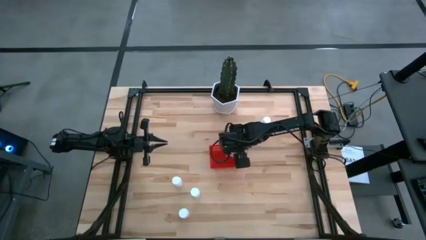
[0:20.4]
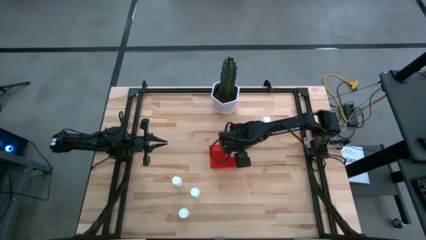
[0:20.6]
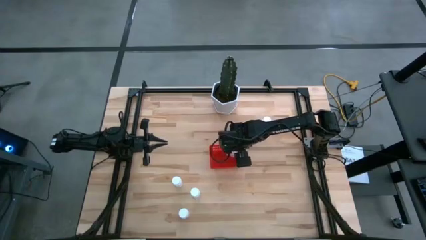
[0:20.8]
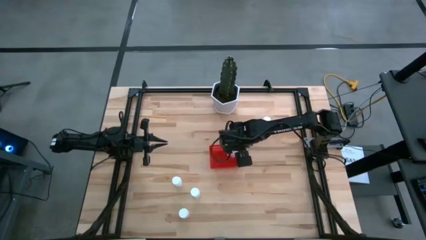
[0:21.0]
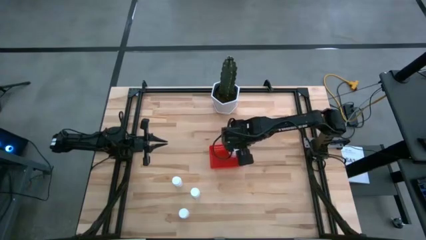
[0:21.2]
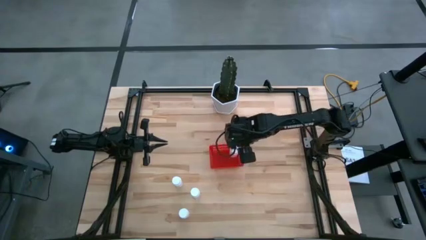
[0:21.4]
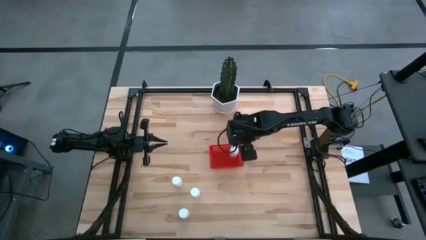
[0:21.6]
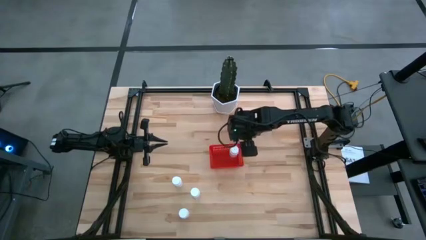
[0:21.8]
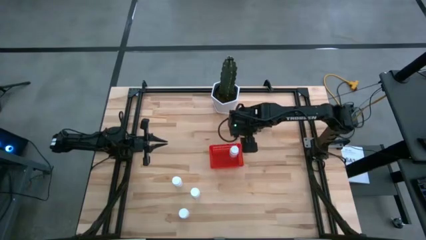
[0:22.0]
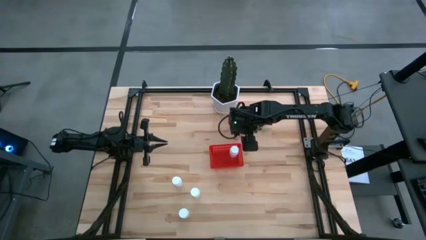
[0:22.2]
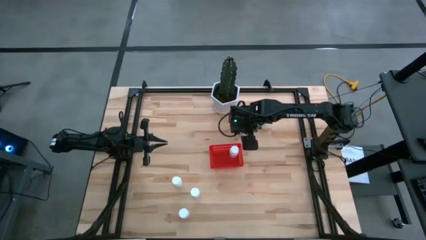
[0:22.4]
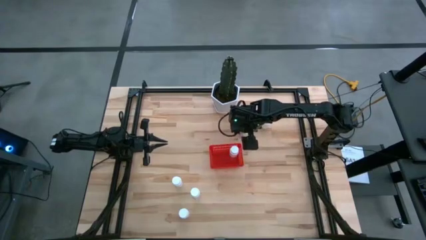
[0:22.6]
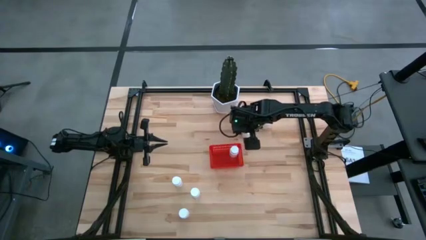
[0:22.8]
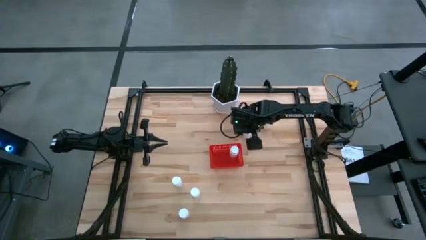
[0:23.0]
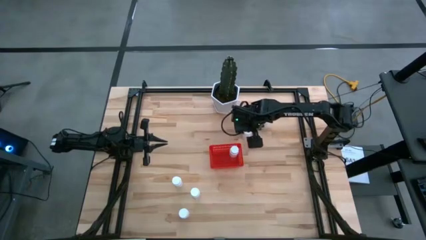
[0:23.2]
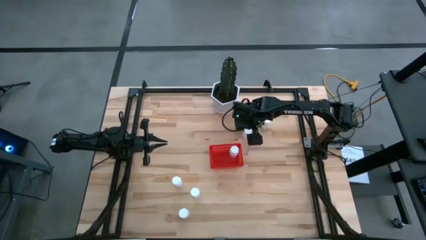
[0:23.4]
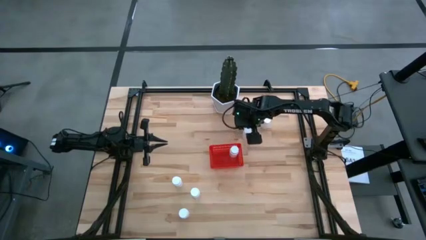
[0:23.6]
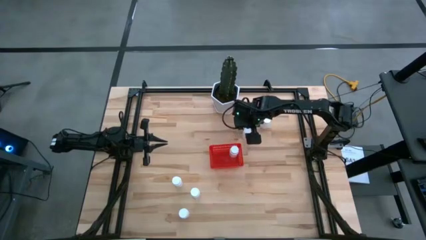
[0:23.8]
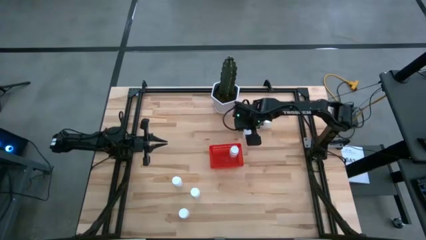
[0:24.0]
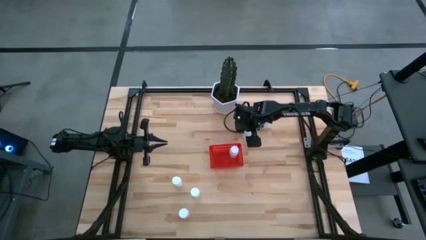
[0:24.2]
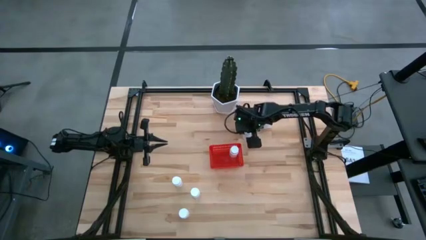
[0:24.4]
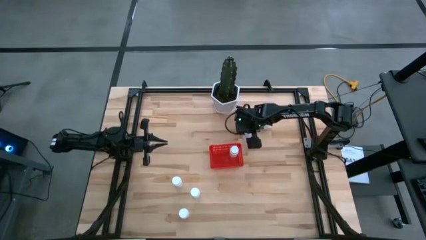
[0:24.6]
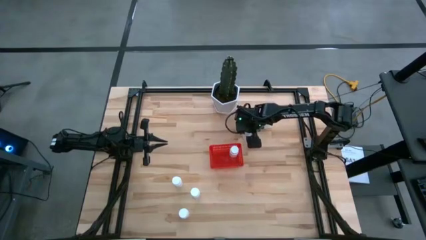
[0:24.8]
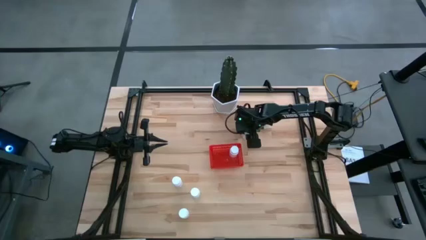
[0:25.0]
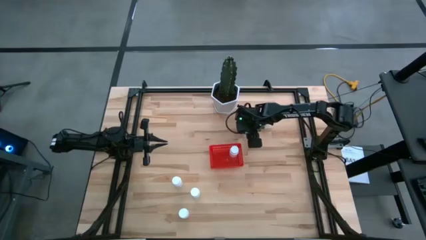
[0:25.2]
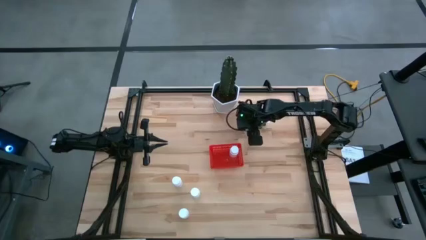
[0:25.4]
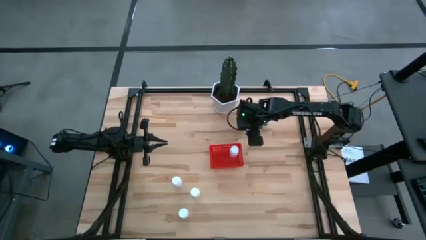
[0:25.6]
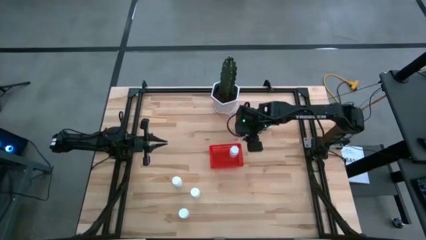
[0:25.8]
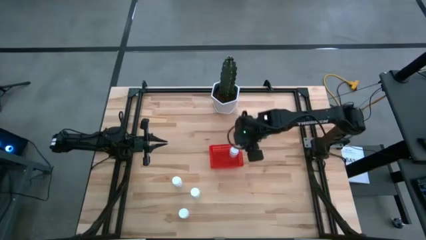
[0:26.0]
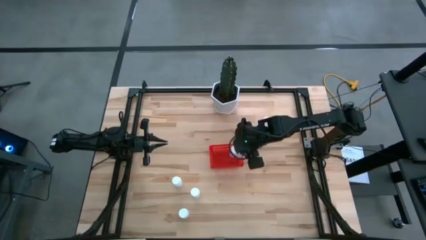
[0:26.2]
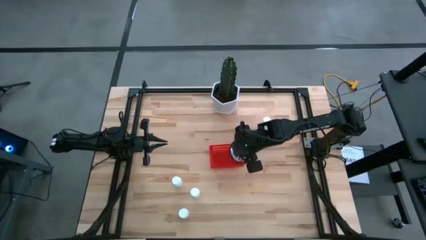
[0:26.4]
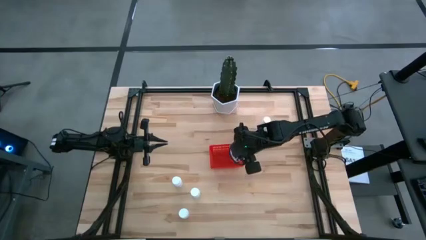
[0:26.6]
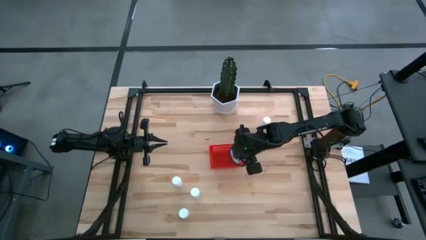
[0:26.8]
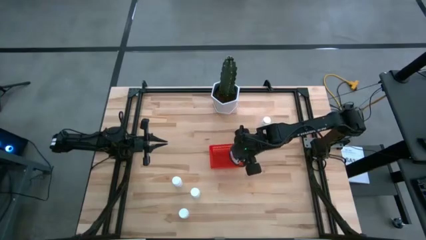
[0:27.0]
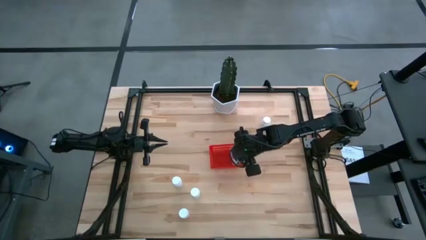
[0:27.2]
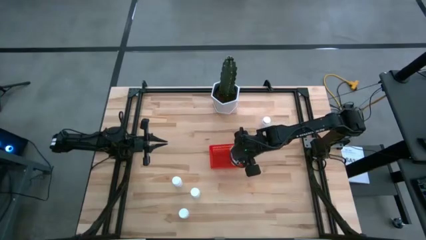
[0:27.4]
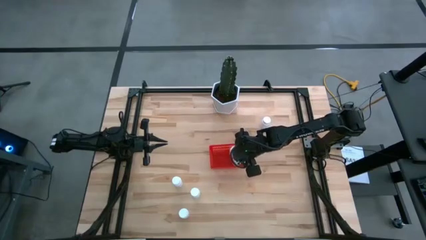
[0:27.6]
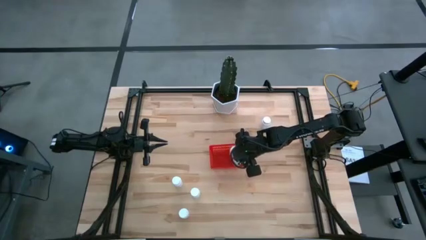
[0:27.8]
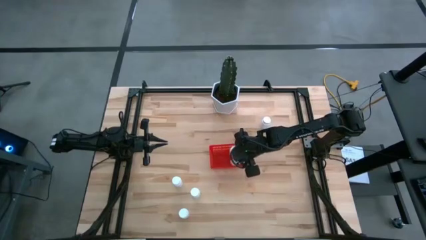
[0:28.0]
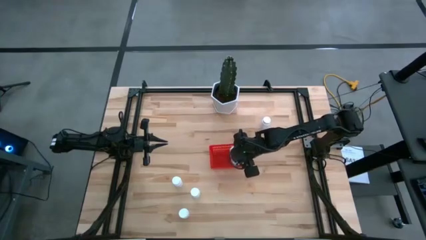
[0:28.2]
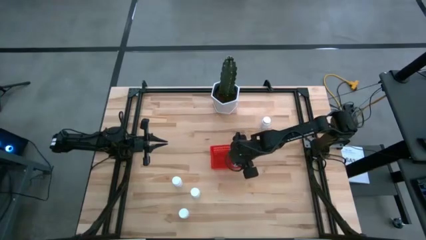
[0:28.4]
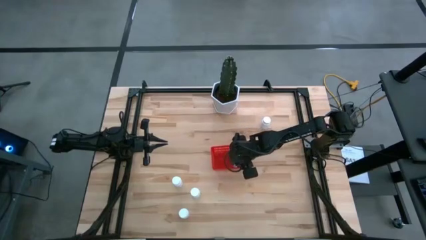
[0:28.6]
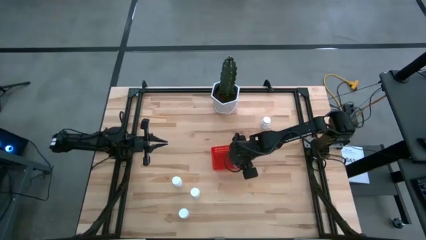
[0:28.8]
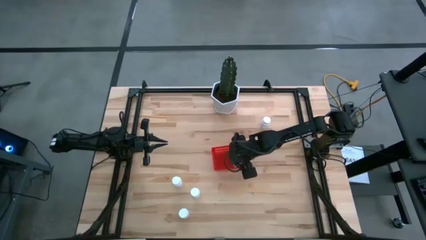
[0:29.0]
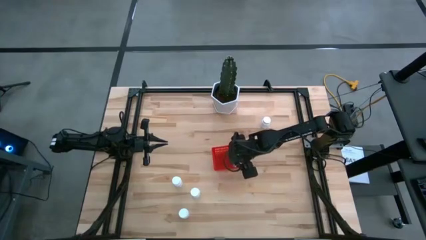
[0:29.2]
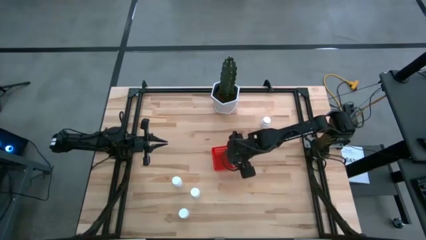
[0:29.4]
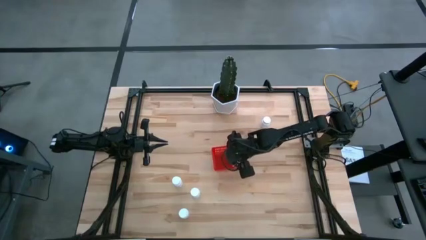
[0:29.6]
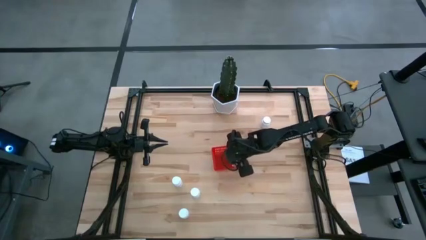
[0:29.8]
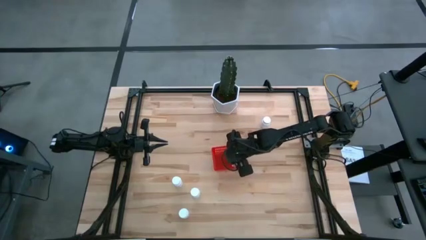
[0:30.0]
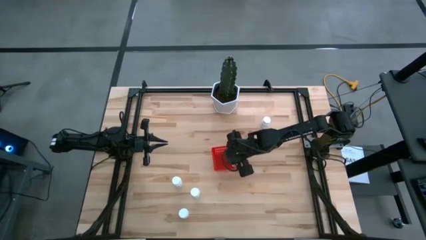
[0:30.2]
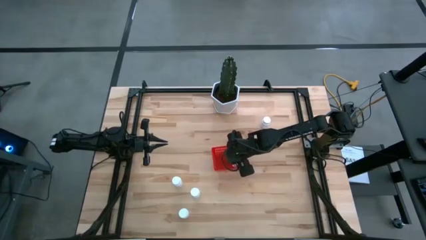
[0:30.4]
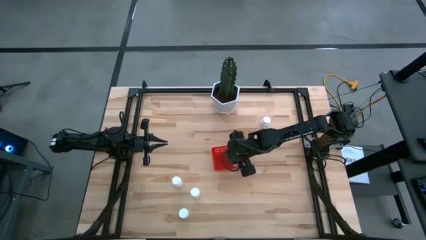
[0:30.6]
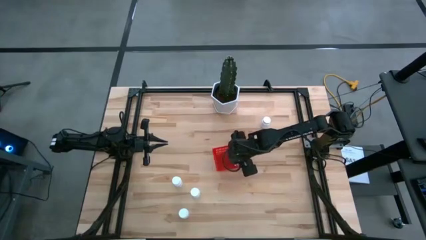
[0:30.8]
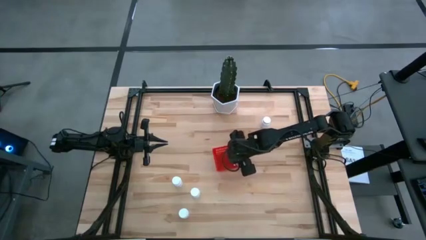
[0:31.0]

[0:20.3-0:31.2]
Task: Pick and place pill bottles into a basket
Put the white pill bottle into the red bin
